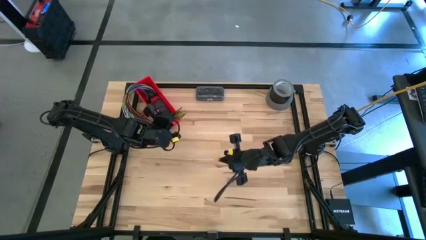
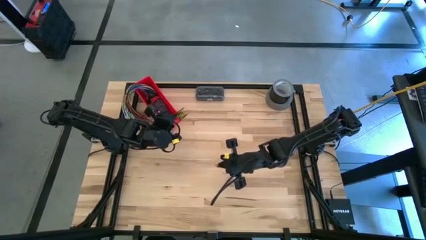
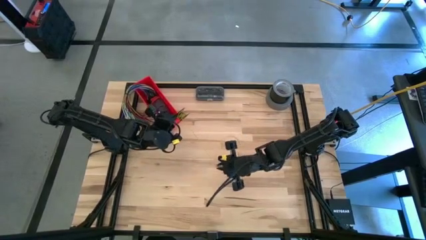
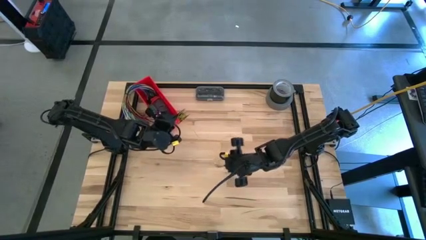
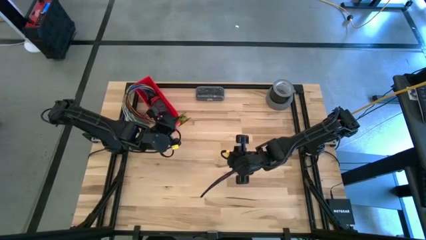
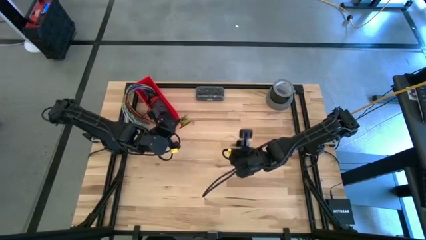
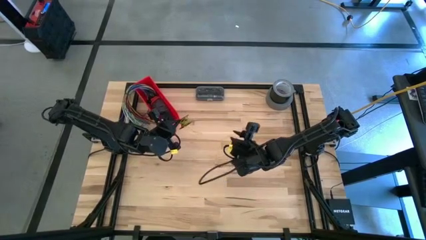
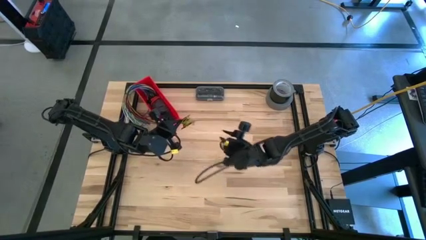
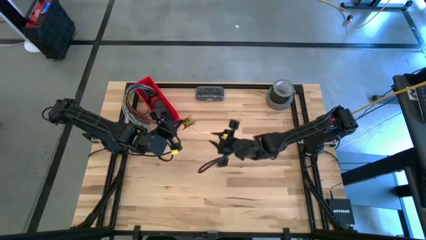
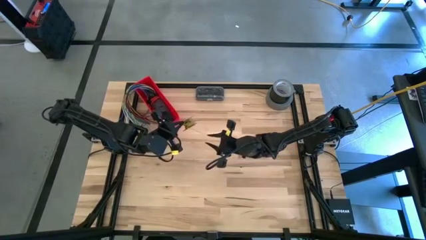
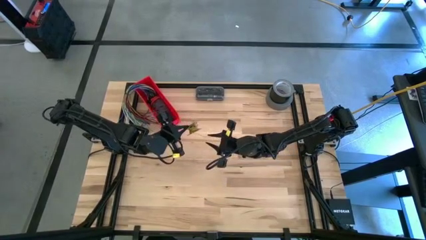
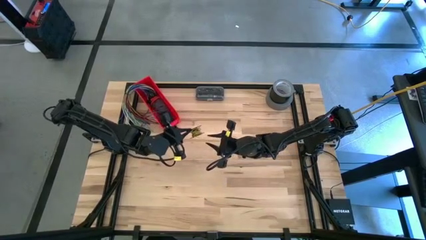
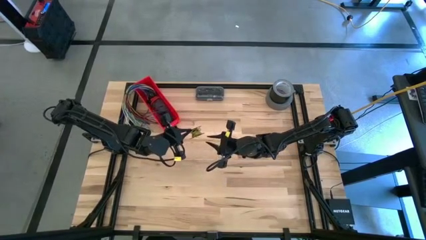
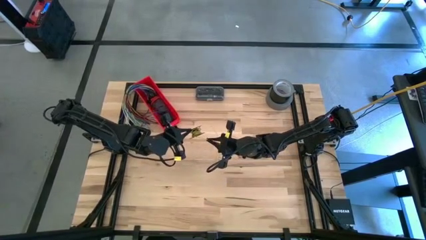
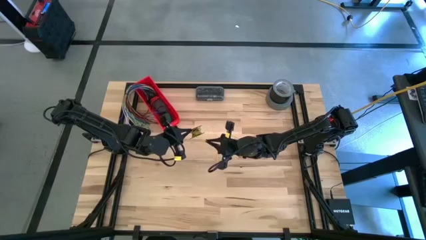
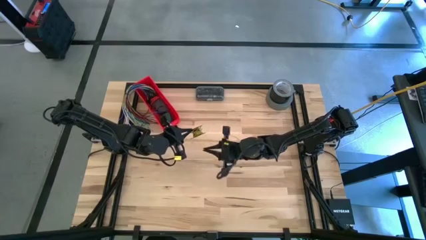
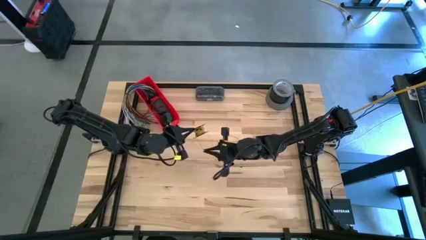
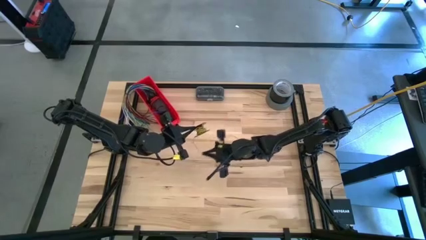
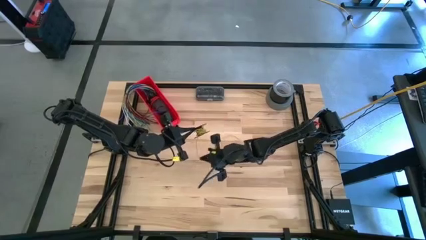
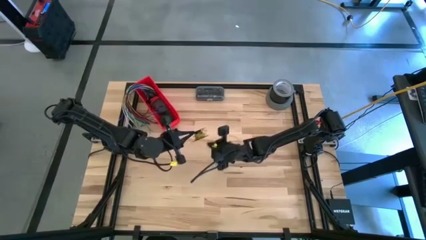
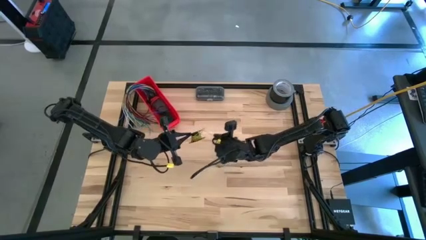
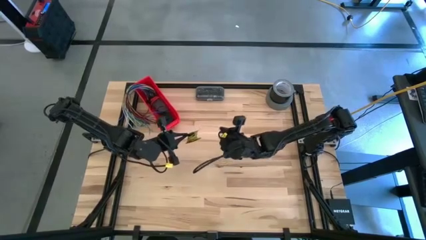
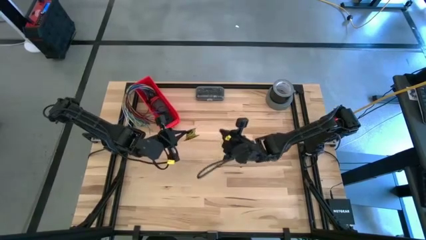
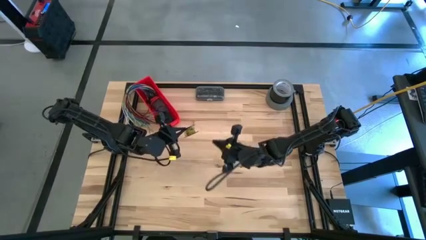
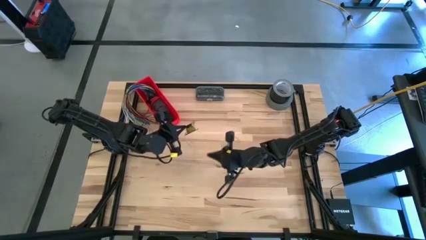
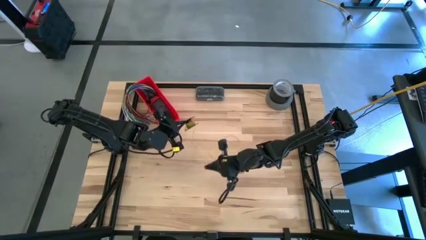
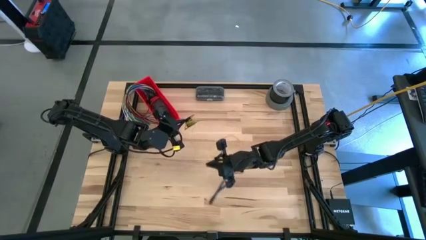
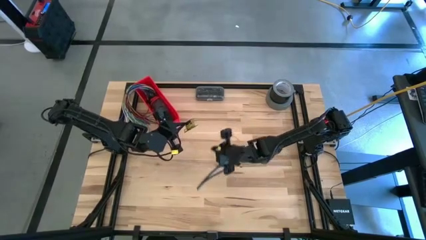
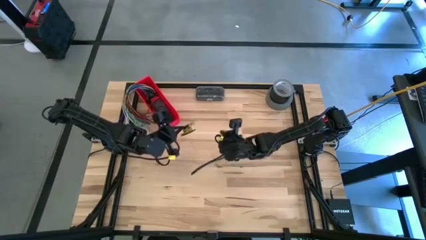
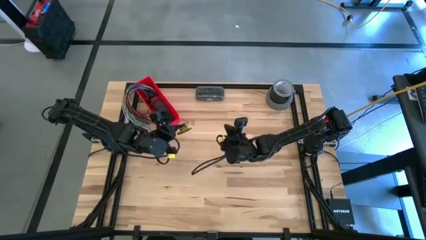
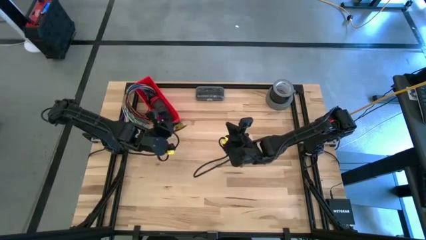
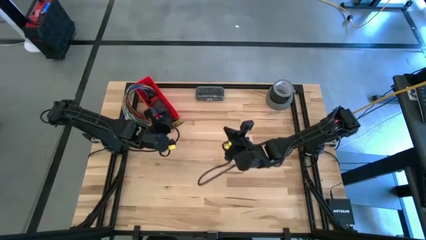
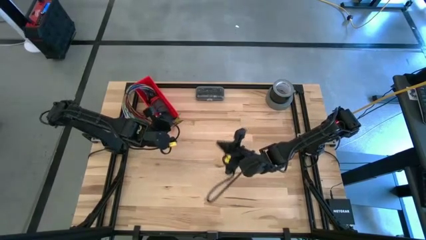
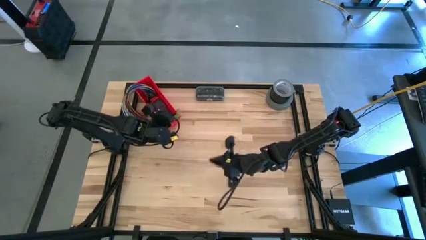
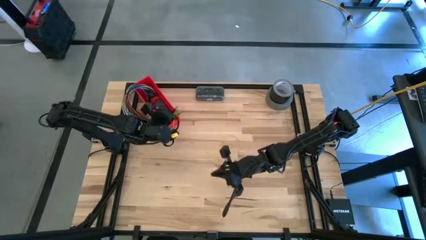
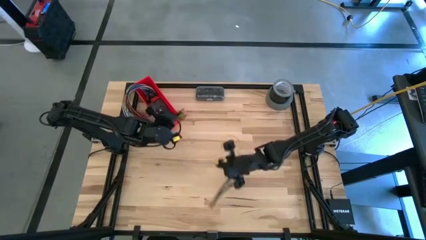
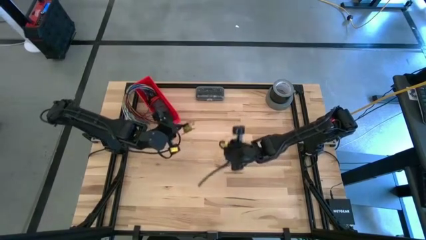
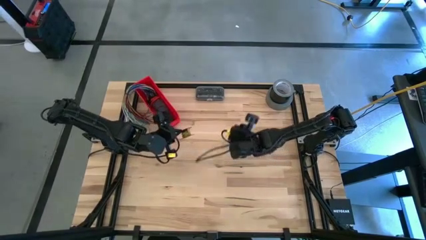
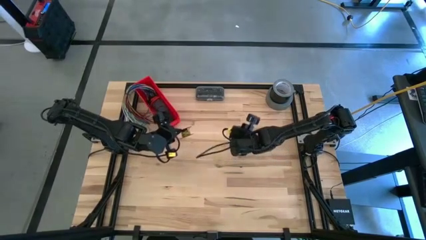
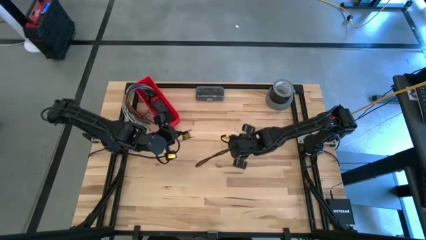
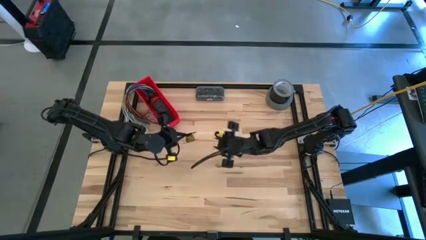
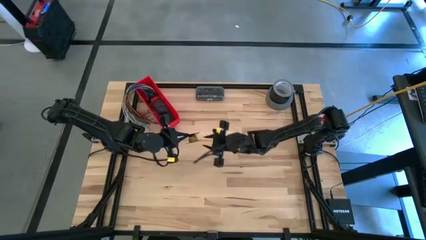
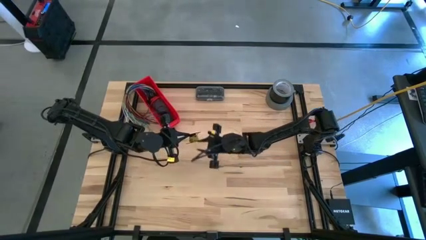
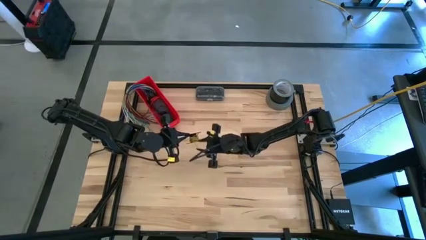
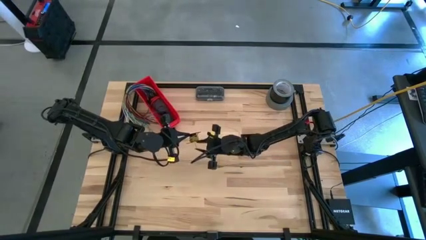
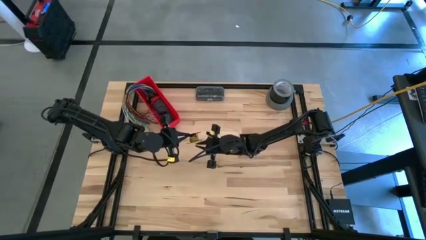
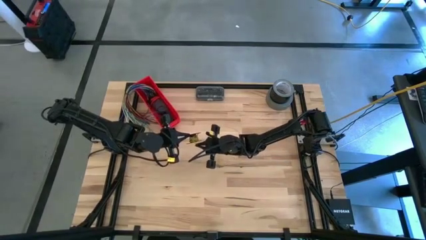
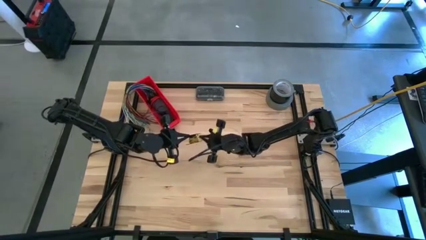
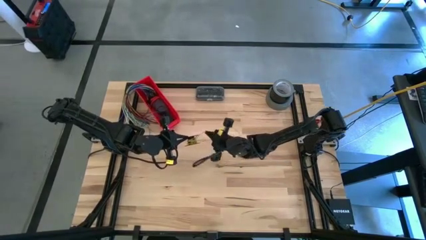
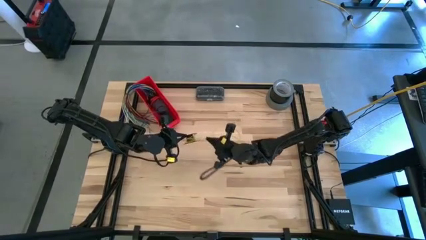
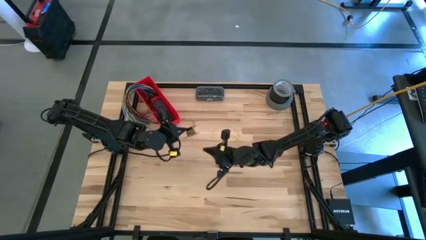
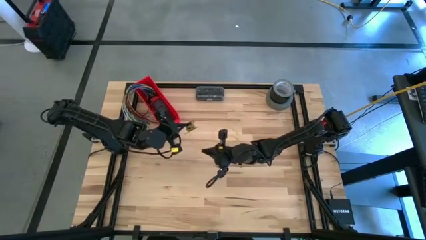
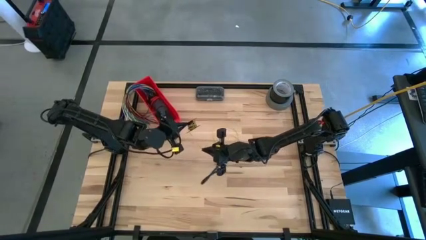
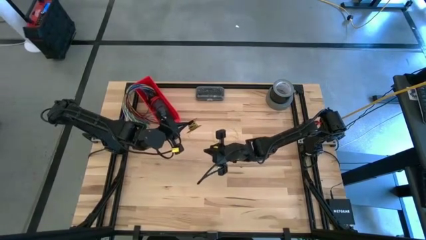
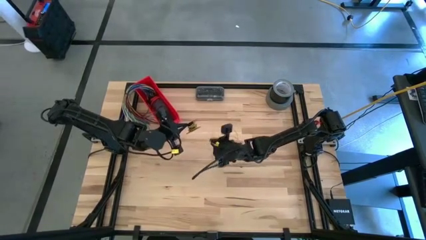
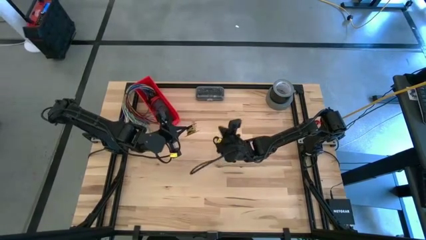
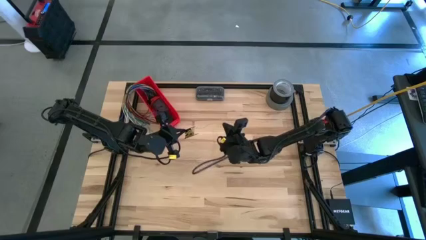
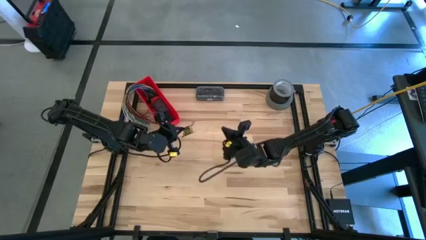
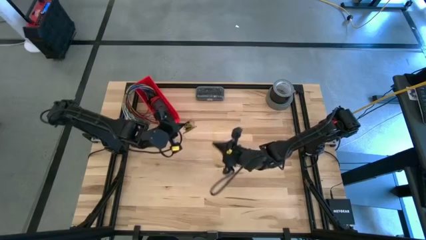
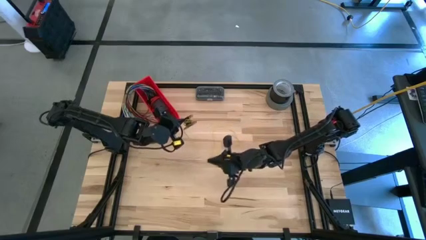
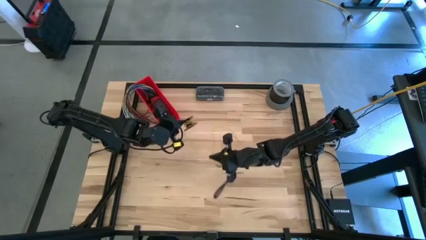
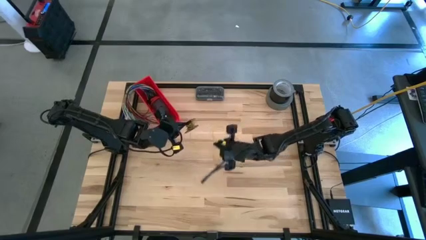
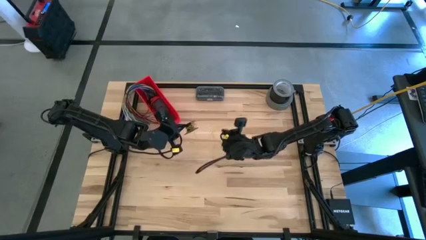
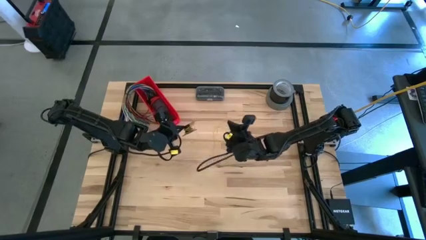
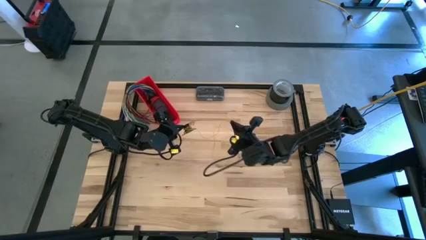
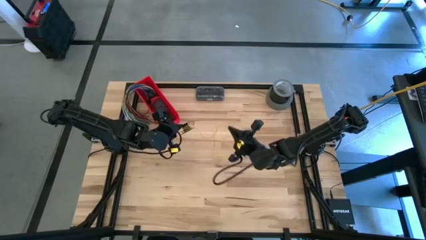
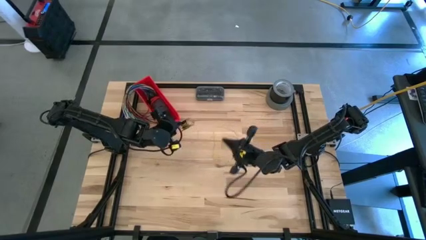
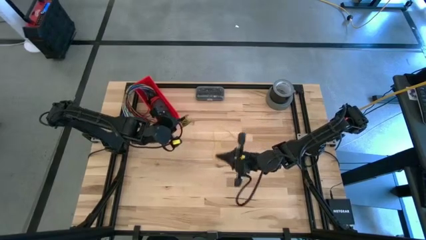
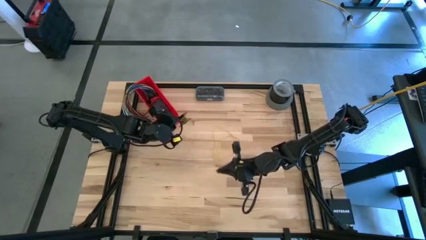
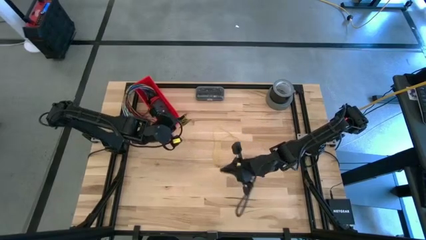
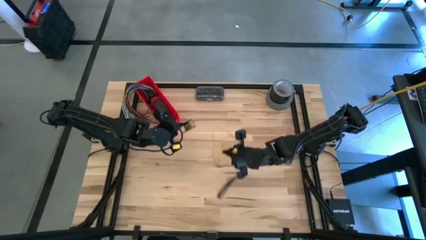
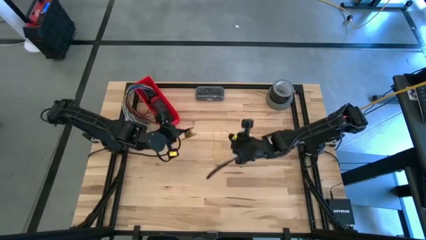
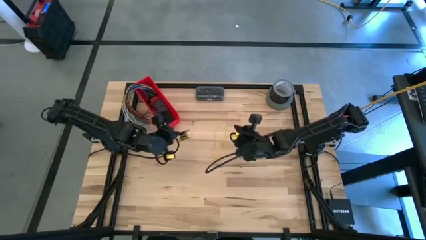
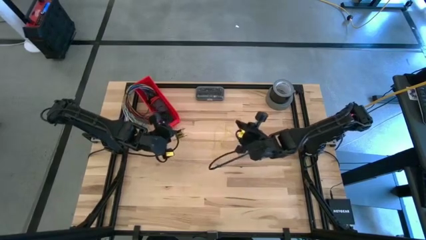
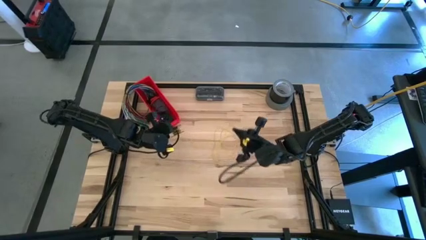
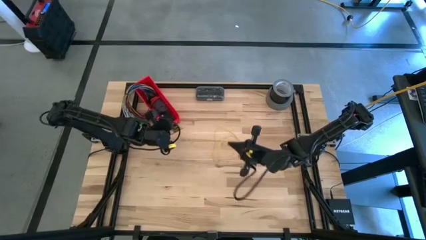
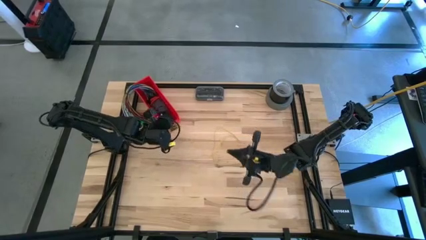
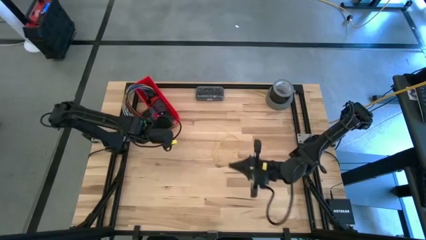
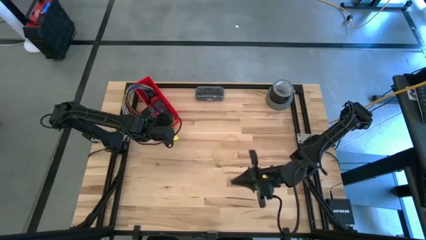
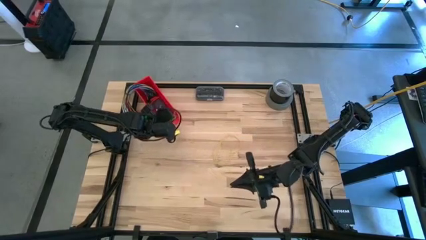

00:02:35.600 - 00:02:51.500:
Task: Coil cords
Uncoil the yellow wire from the spool
